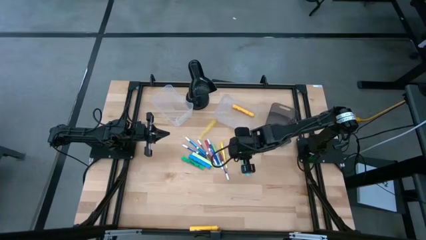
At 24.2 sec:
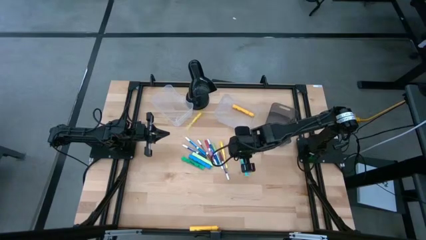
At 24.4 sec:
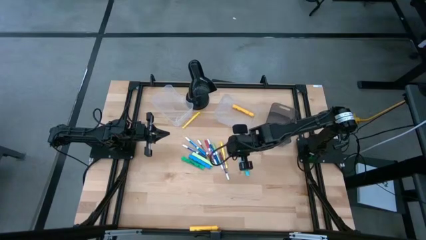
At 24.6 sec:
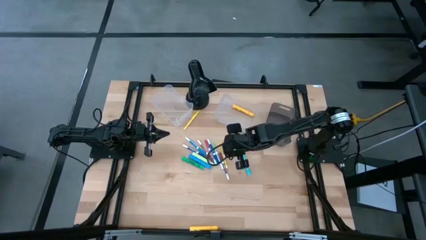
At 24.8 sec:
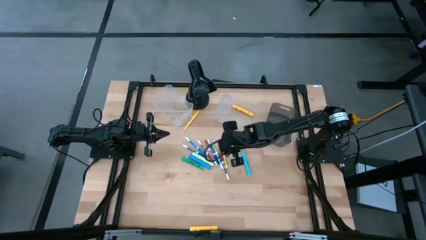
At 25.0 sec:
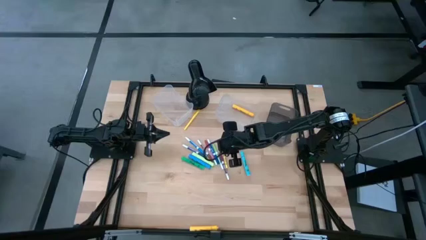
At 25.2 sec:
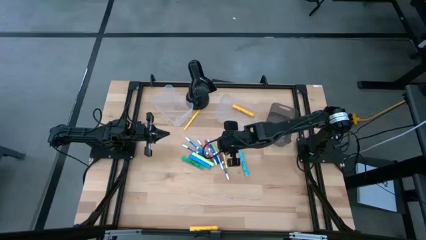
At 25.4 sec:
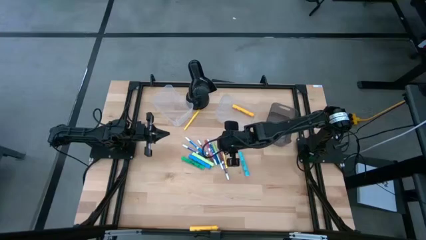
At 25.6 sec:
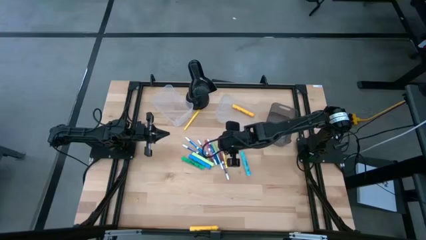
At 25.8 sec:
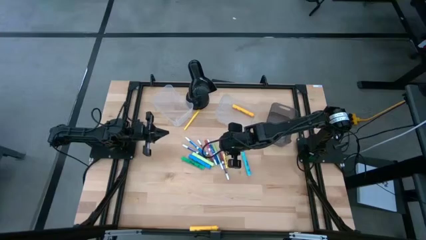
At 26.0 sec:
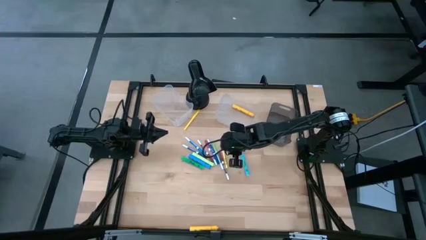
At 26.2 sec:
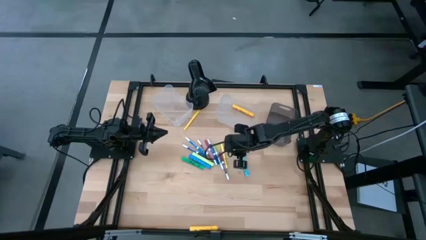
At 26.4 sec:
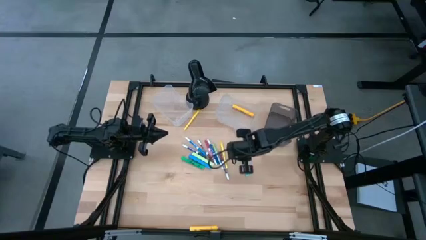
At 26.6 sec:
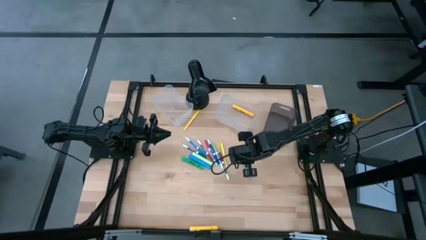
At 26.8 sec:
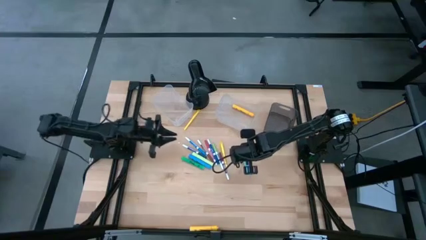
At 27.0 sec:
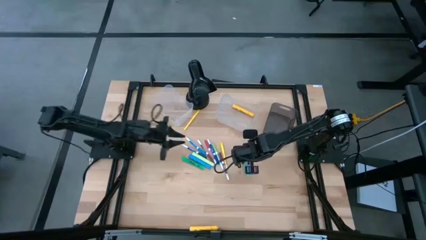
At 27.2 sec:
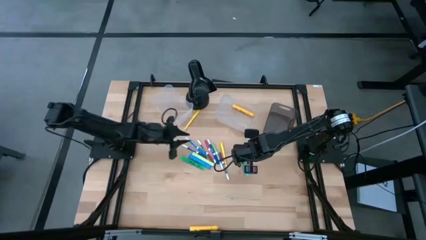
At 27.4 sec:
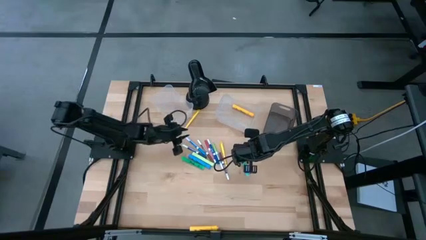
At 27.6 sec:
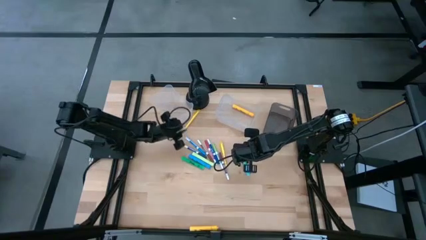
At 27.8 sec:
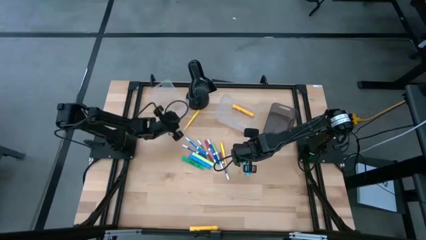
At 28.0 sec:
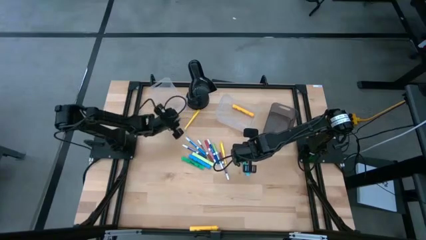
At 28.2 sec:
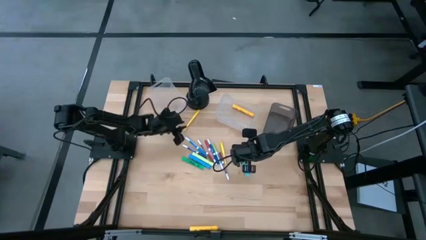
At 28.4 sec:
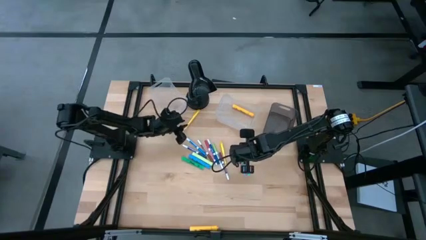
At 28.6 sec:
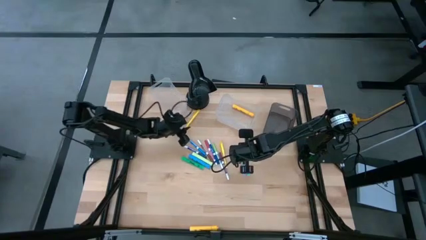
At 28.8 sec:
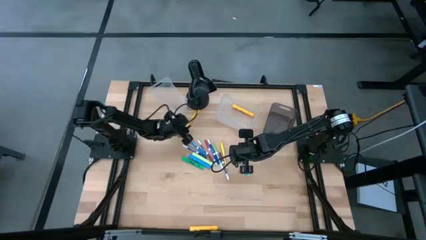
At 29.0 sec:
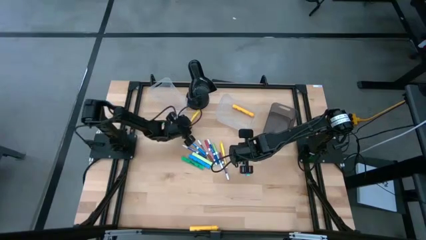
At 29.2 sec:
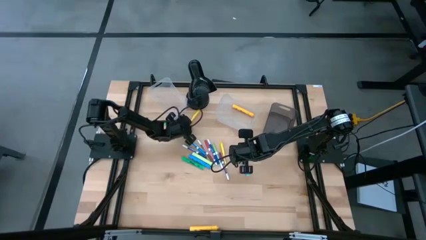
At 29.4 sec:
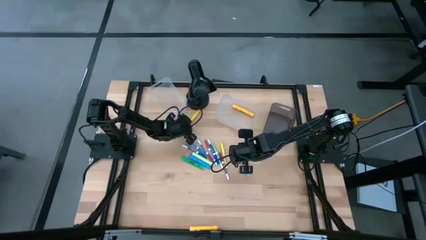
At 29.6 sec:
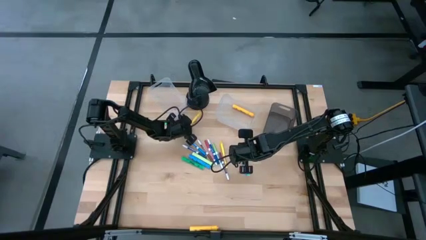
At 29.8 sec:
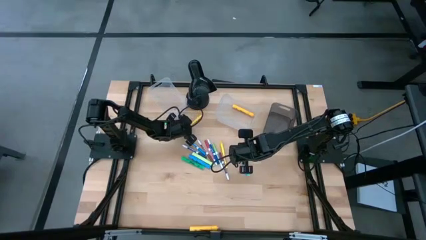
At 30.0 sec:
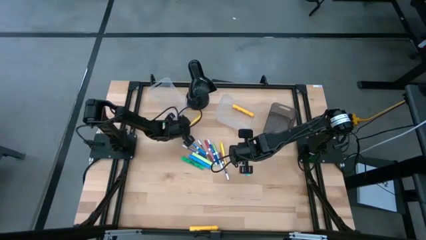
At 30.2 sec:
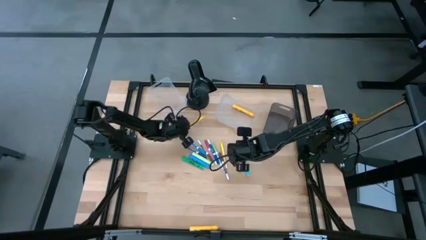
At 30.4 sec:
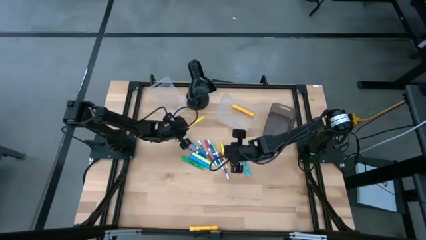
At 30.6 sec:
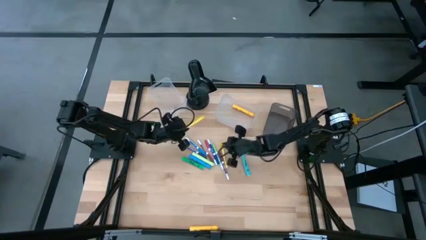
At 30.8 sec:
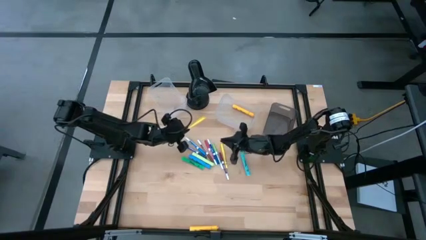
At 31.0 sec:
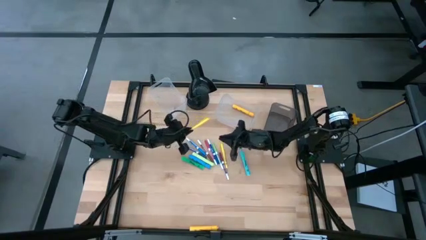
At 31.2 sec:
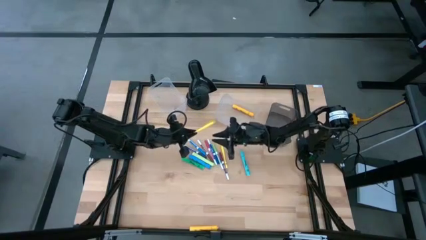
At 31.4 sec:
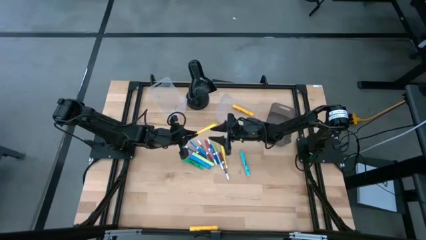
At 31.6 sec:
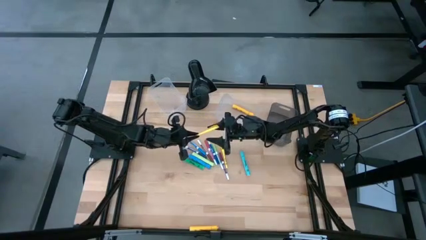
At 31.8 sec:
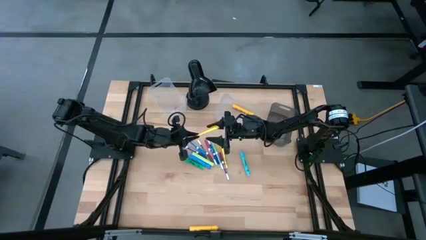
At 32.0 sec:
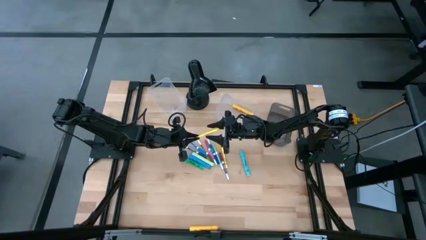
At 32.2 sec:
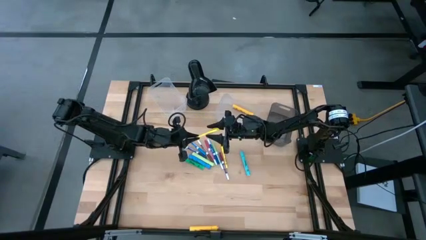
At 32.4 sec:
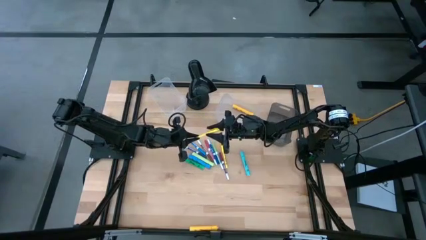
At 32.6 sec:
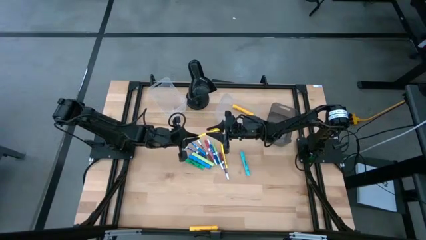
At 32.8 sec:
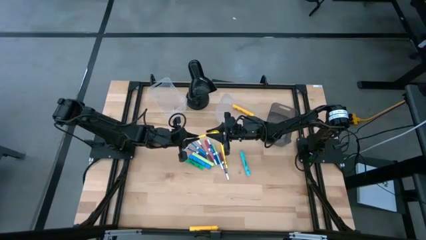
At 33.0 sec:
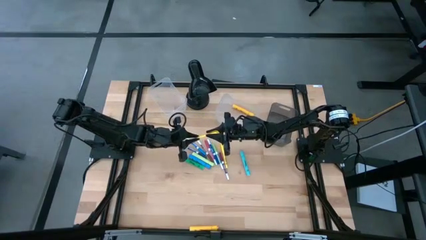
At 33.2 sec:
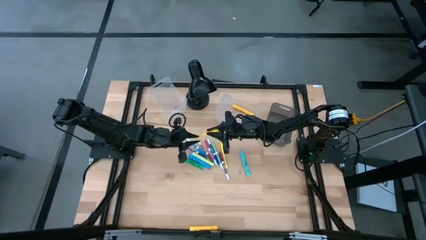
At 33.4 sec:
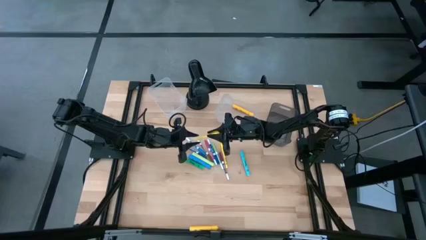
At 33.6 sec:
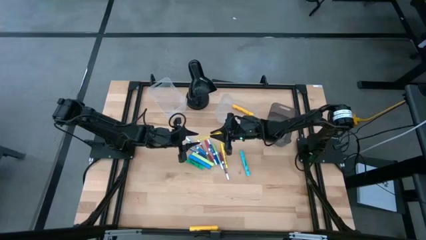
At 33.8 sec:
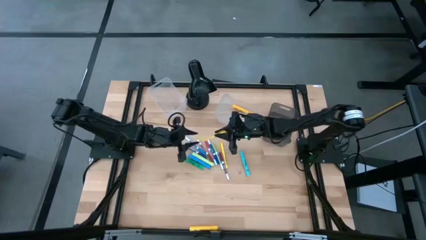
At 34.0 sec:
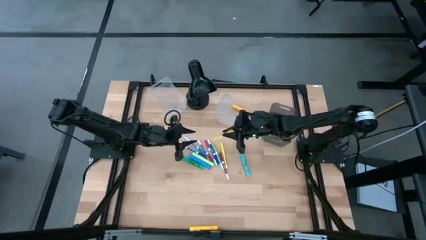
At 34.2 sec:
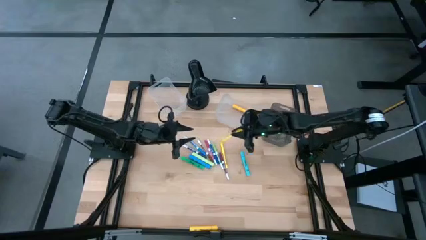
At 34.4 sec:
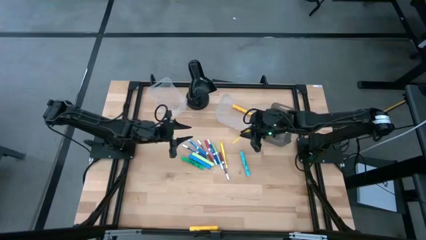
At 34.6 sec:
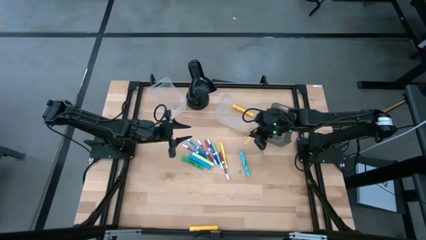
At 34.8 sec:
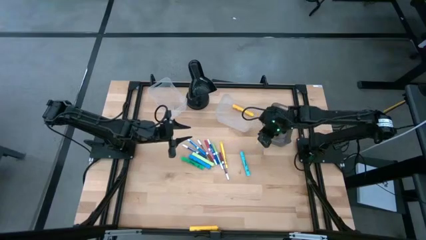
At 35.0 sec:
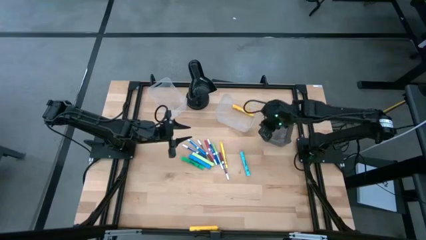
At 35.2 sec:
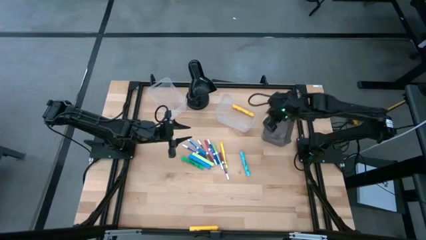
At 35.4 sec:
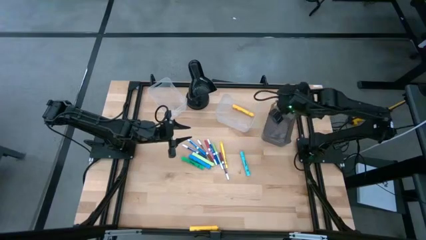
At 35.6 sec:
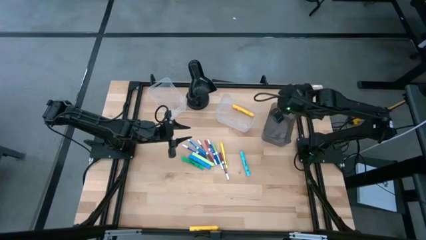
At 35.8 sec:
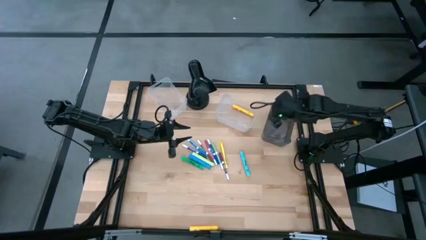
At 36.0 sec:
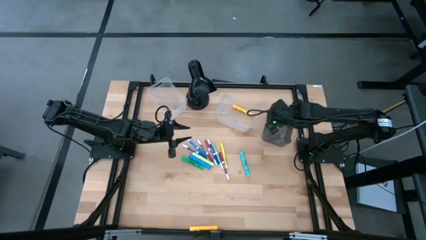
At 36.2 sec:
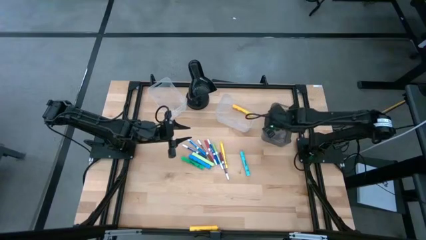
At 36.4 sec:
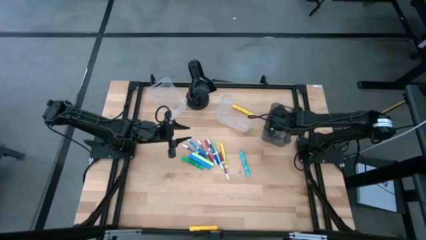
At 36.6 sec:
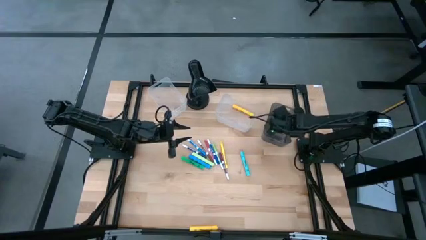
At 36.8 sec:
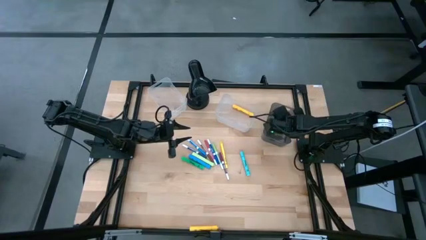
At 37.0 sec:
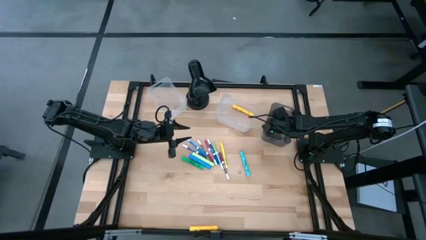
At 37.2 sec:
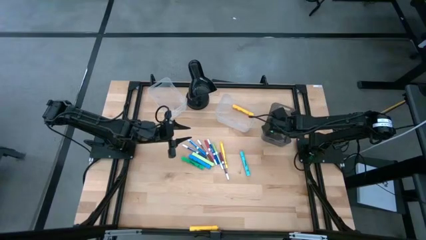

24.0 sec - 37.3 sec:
Task: Pick & Place Markers
Put the right yellow pen in the gray bin
